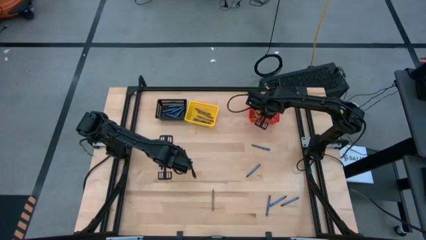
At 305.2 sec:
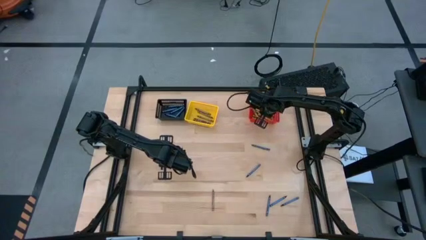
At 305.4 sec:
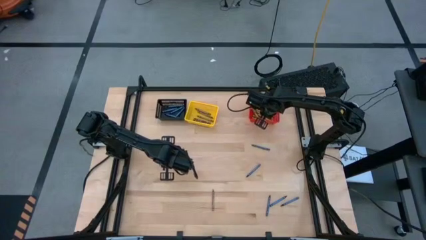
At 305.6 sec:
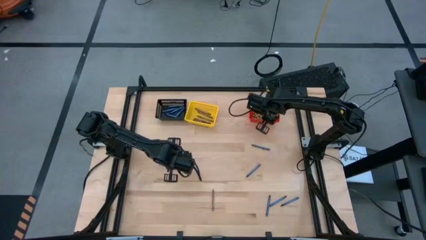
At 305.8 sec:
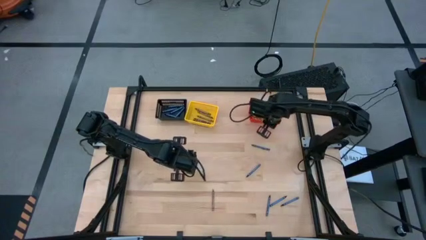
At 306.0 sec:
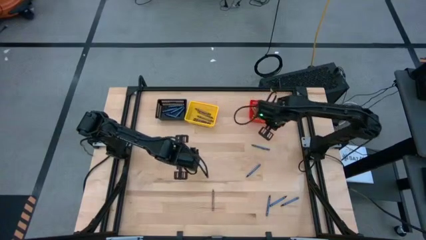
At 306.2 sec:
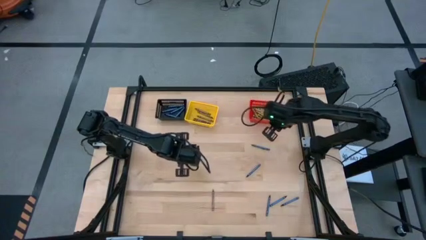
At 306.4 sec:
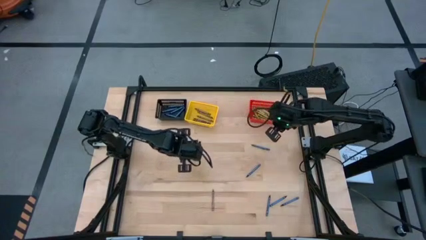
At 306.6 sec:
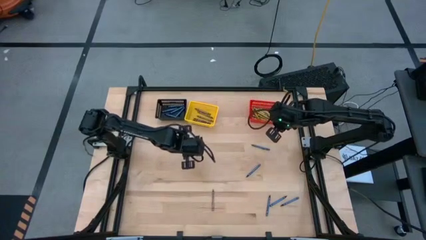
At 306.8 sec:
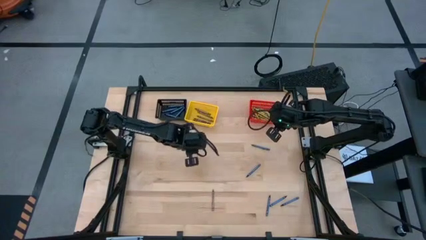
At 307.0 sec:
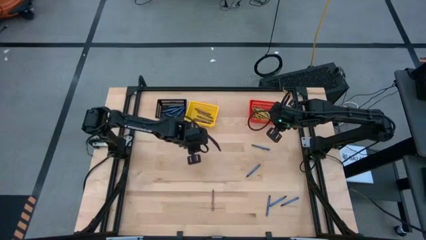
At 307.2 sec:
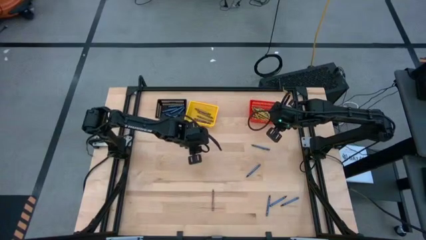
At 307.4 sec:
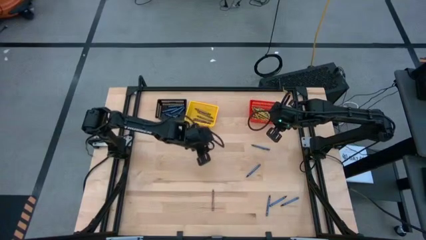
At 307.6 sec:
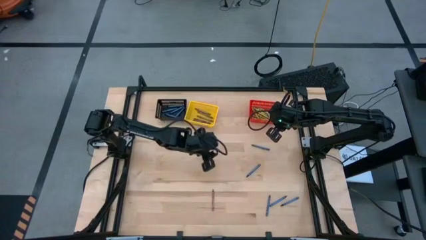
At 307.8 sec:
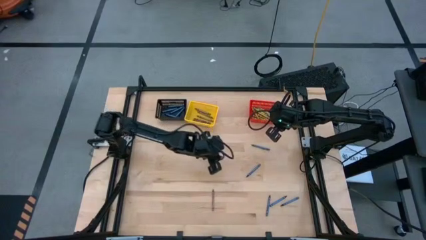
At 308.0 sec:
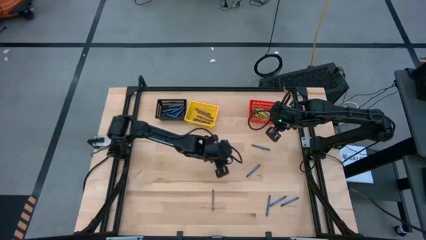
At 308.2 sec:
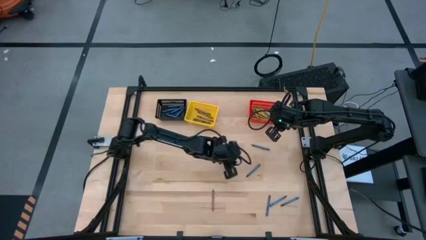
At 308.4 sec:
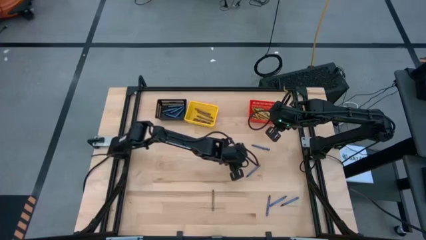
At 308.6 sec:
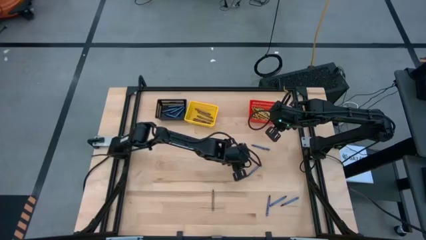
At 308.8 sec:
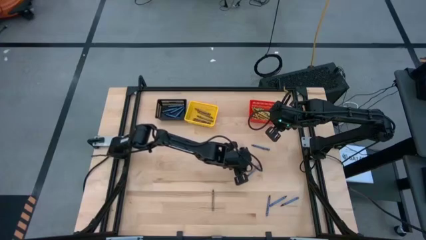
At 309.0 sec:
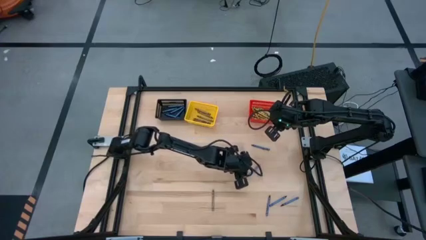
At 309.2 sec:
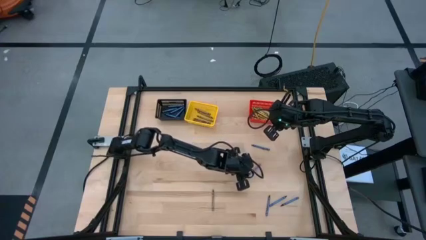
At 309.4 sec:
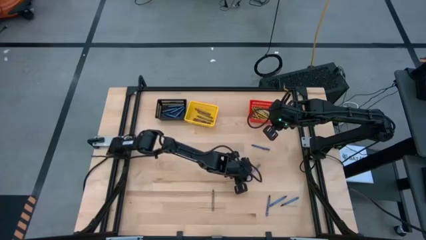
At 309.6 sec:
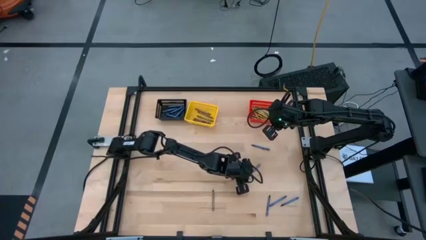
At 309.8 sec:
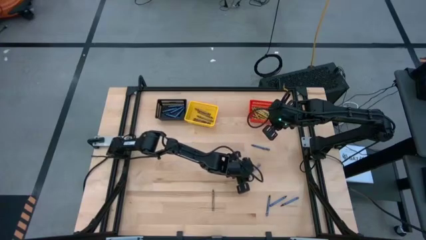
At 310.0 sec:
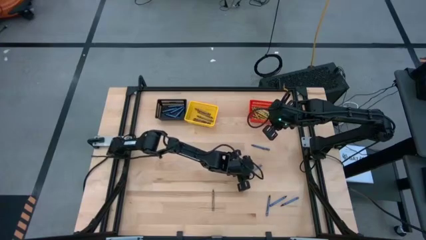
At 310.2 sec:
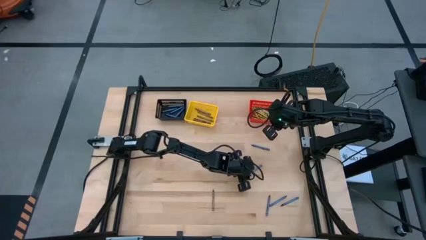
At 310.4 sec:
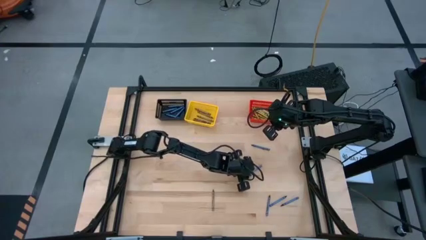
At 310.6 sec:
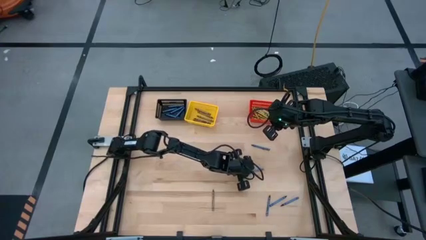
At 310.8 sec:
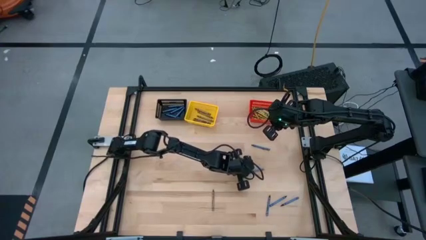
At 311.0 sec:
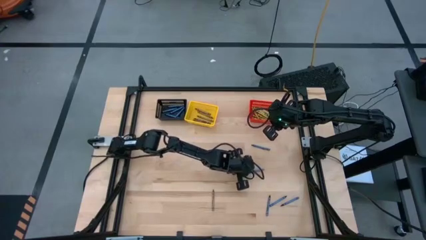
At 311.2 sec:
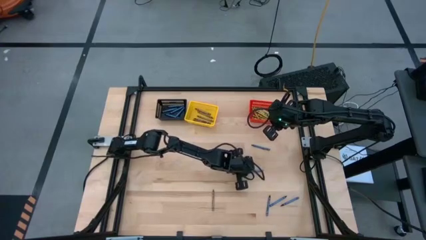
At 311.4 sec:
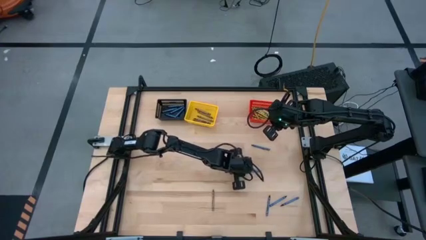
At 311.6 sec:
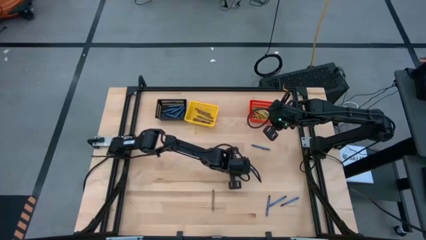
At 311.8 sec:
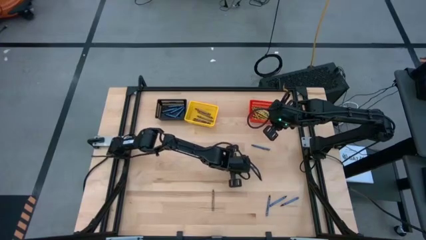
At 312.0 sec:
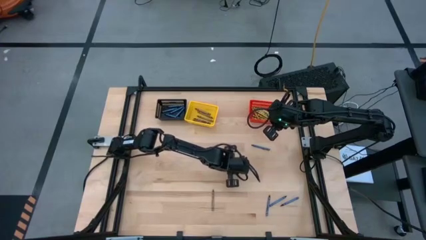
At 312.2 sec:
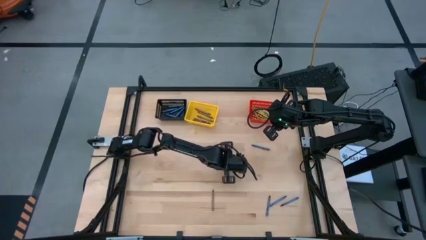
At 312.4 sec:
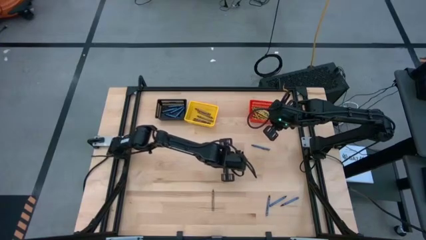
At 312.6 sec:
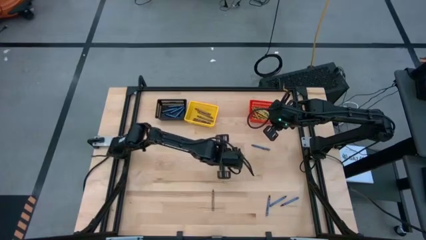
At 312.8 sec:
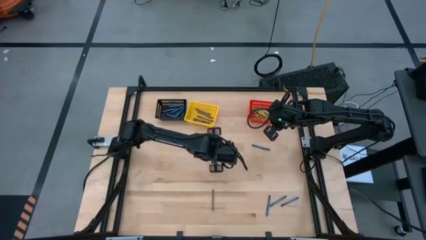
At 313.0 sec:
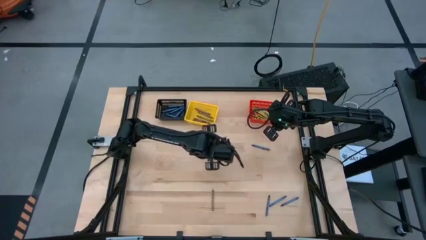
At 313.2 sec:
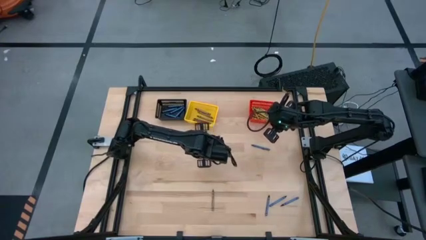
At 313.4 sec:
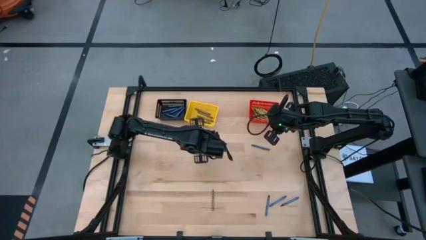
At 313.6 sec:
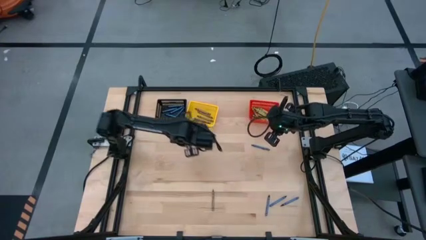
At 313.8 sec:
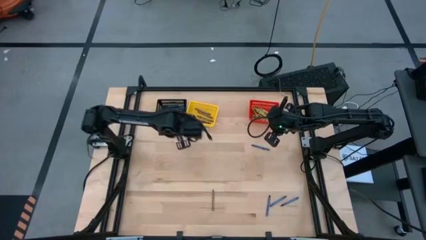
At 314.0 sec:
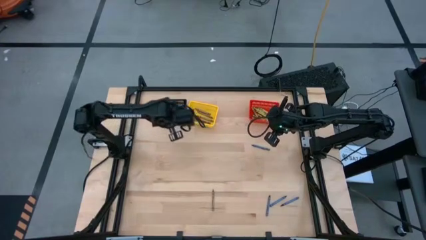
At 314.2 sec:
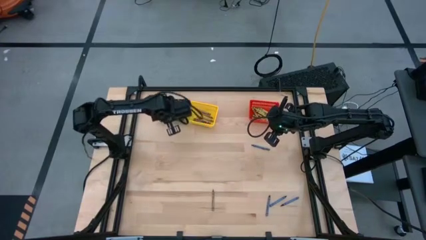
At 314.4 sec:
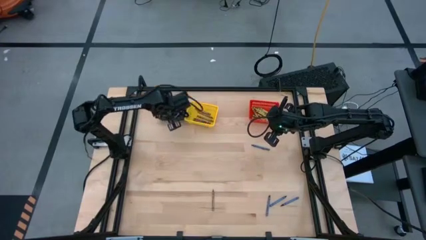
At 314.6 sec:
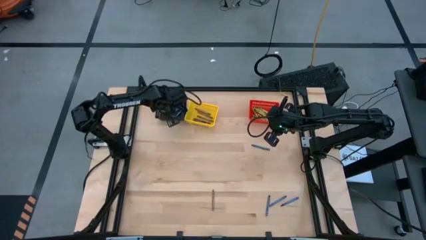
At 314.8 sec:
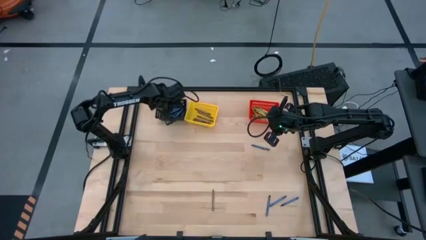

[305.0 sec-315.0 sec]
Task: Sort crayons
Put the blue crayon into the black bin

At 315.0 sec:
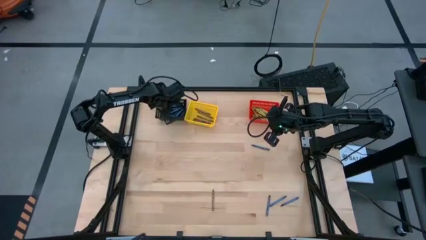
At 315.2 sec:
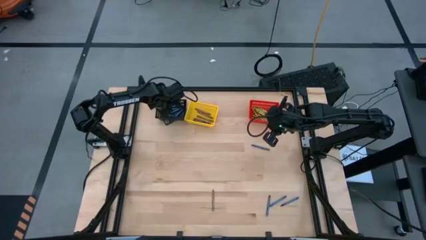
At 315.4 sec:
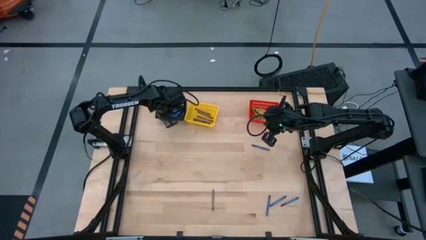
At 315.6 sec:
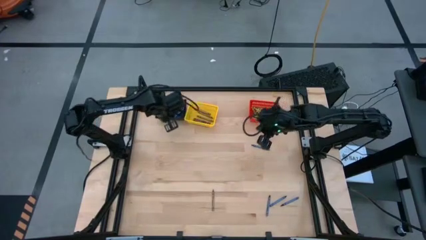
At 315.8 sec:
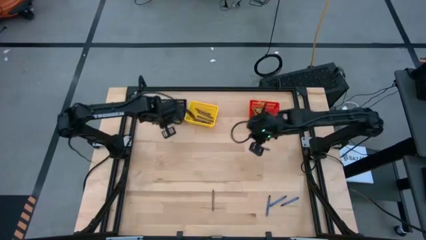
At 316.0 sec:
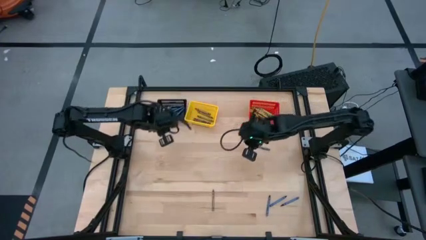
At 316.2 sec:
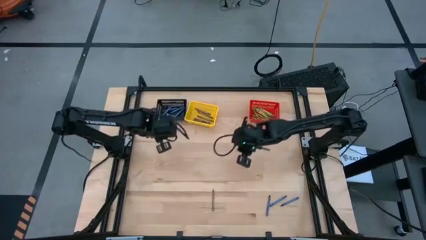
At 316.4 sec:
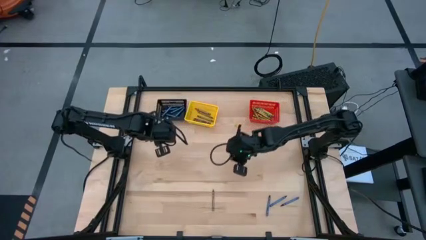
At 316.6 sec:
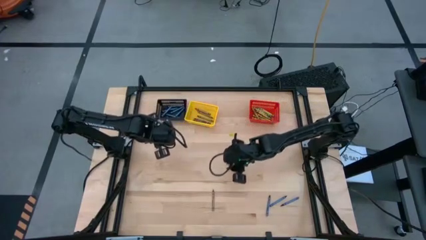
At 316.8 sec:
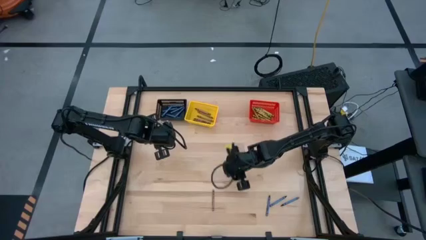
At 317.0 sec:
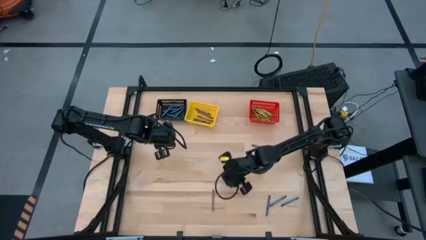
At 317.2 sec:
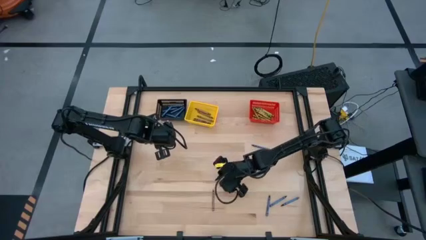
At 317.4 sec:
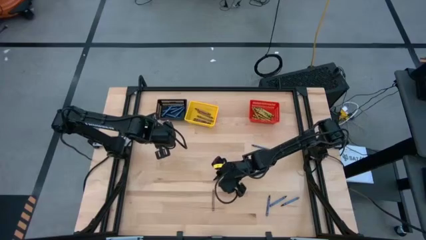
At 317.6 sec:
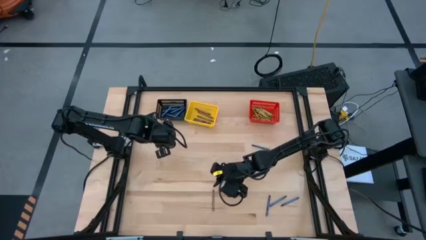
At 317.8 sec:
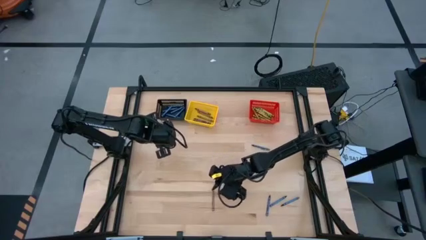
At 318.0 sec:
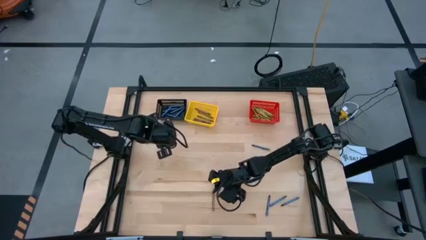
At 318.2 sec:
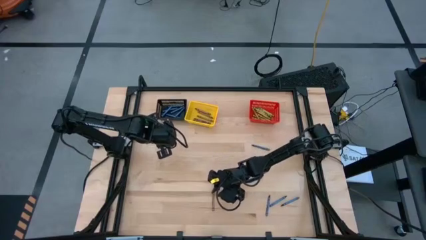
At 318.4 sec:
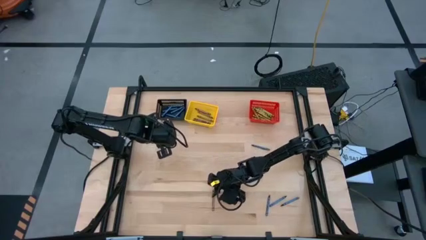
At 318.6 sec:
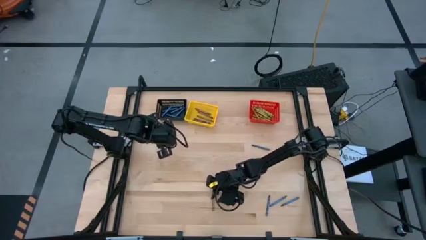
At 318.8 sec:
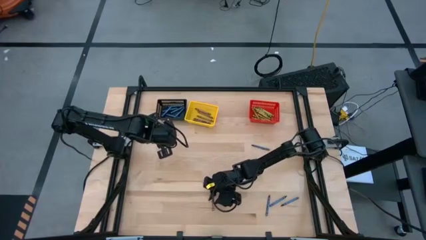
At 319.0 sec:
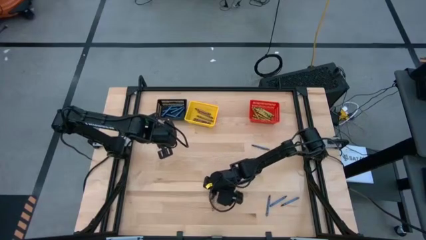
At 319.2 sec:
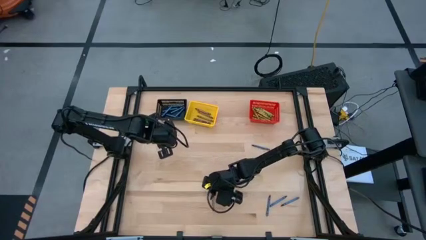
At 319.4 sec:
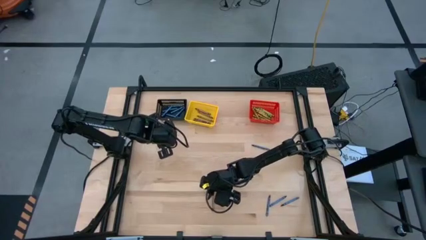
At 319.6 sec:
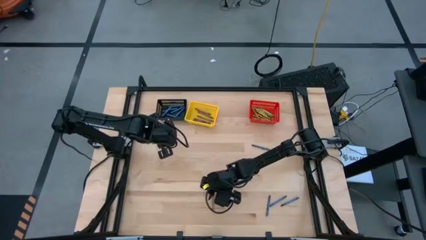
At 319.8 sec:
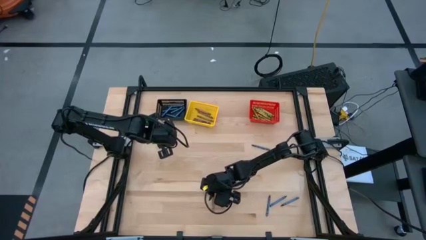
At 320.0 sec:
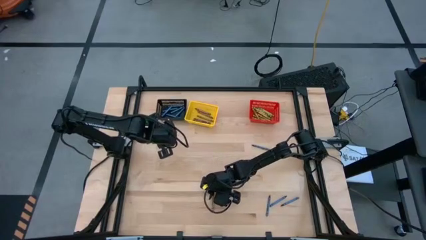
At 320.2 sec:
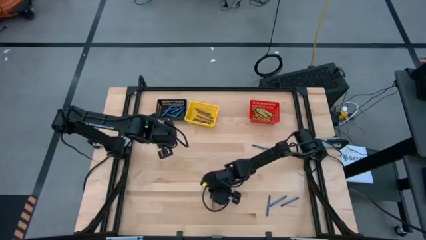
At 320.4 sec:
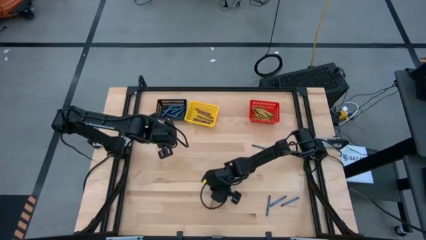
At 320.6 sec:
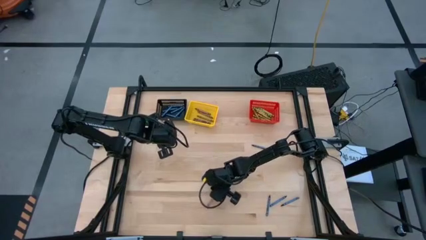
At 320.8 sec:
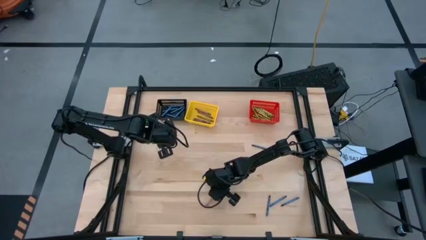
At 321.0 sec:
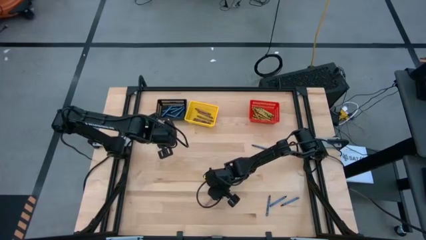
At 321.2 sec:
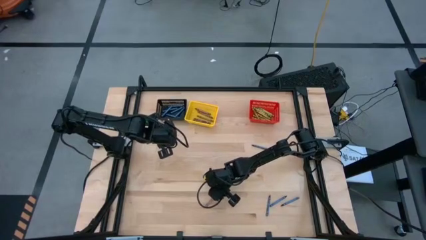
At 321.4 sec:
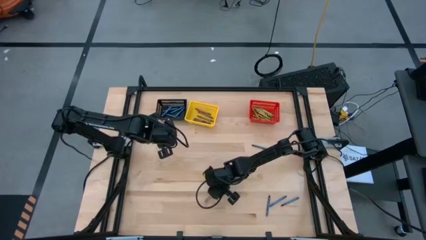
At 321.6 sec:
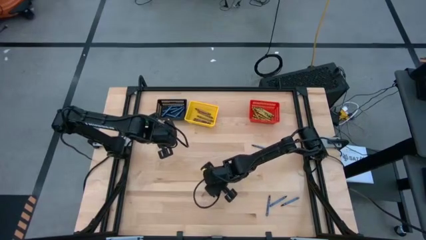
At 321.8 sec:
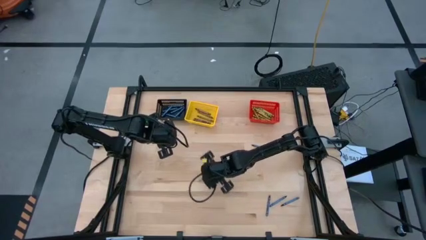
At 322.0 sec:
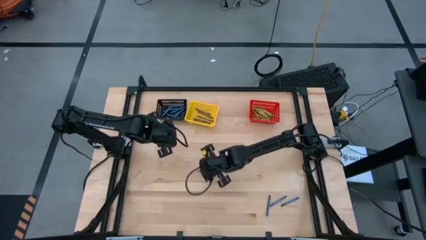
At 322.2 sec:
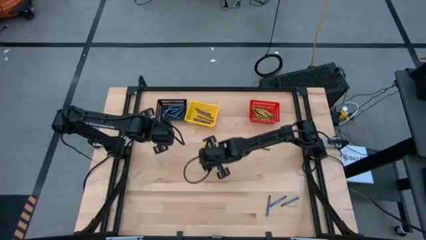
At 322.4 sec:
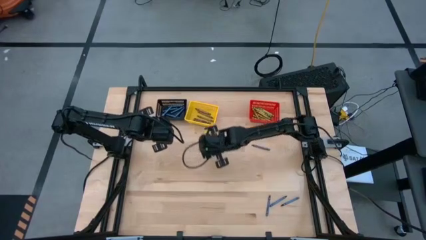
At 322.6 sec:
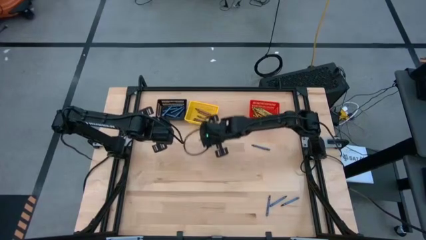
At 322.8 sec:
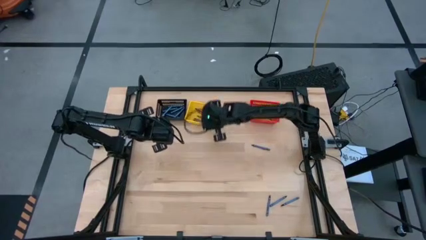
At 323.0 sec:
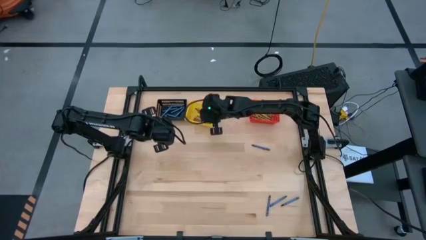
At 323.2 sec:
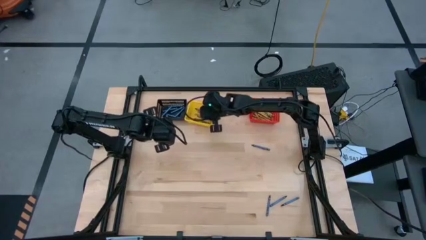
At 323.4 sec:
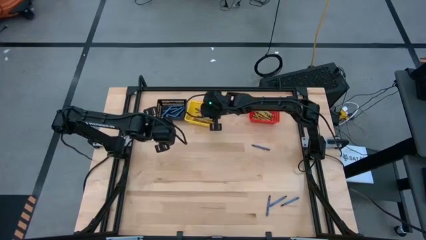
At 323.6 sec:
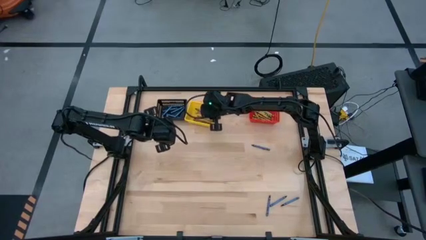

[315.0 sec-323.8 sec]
Put the brown crayon into the yellow bin
